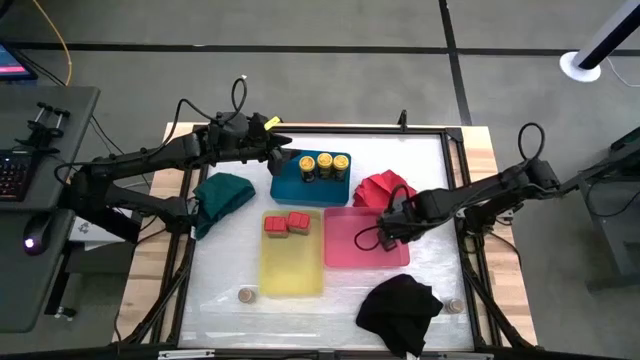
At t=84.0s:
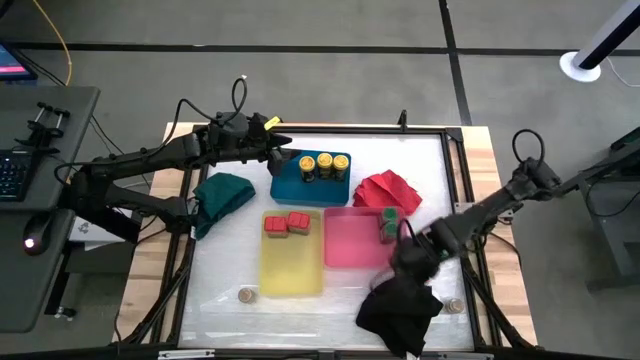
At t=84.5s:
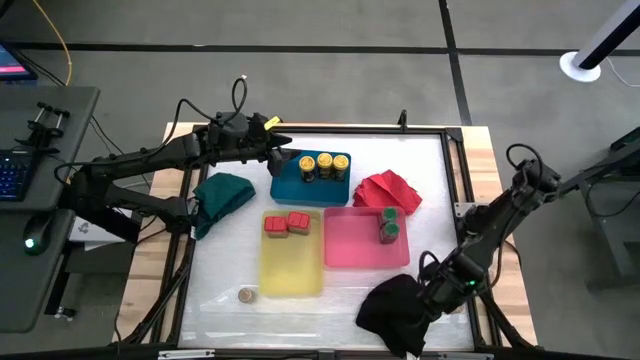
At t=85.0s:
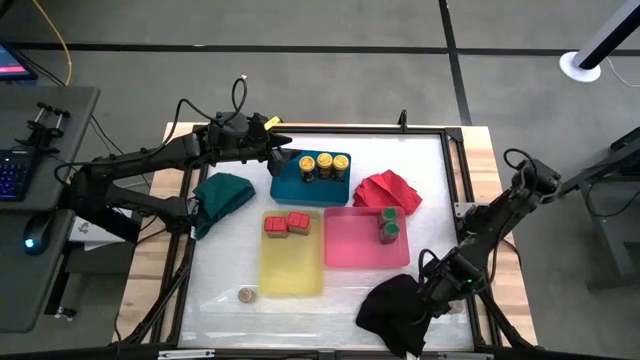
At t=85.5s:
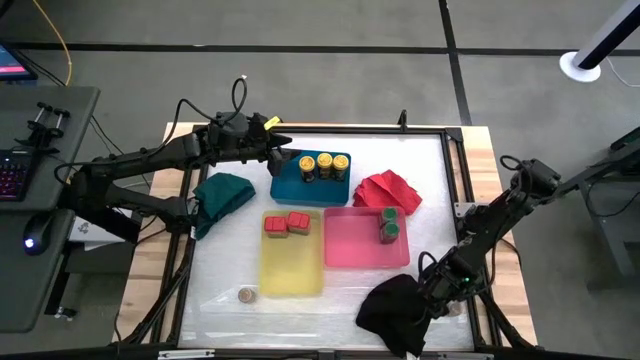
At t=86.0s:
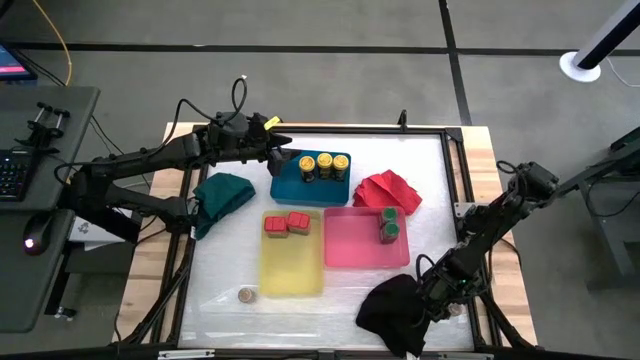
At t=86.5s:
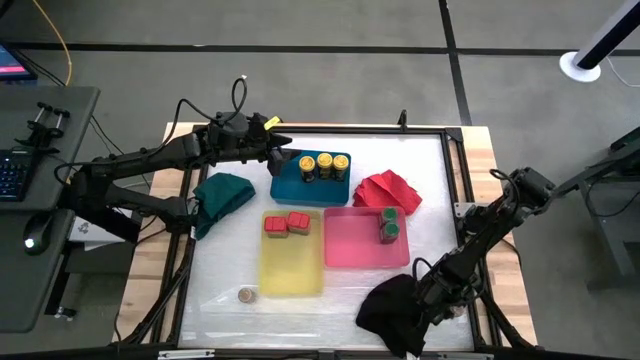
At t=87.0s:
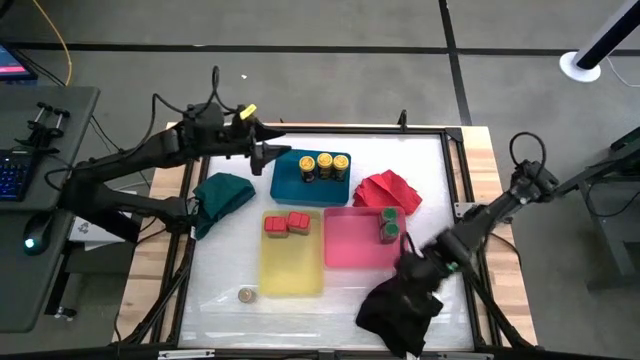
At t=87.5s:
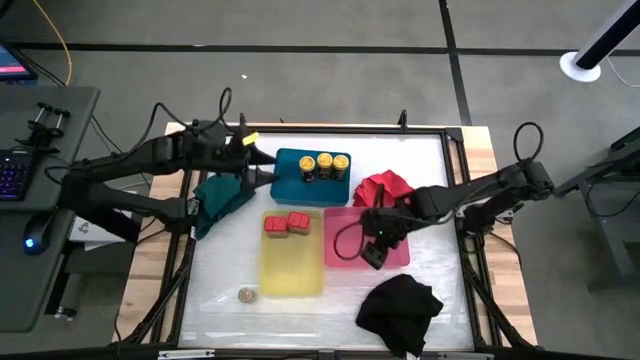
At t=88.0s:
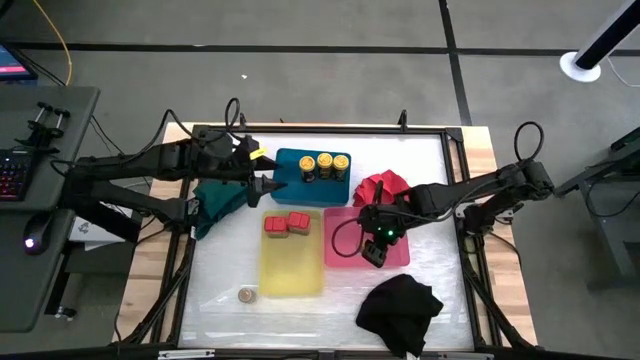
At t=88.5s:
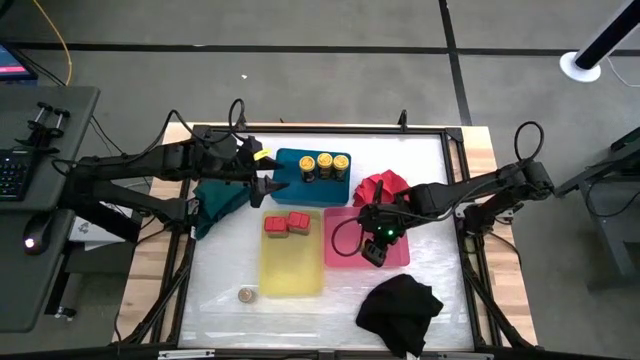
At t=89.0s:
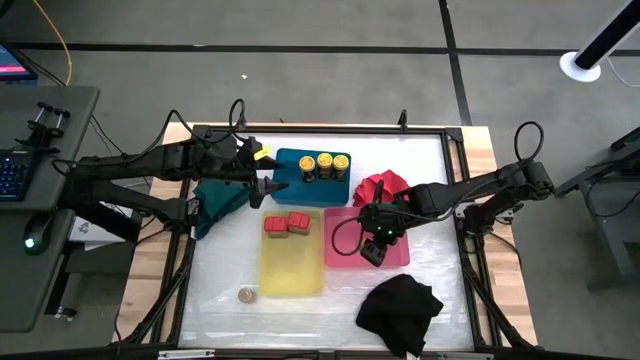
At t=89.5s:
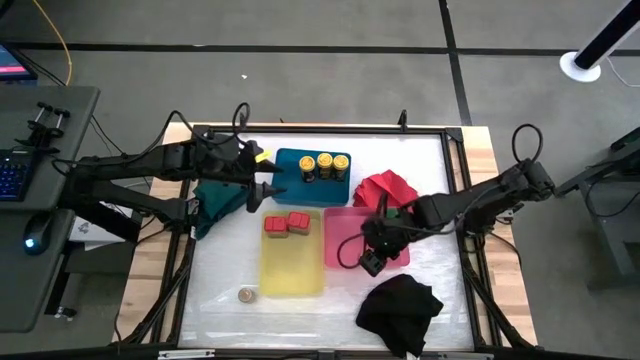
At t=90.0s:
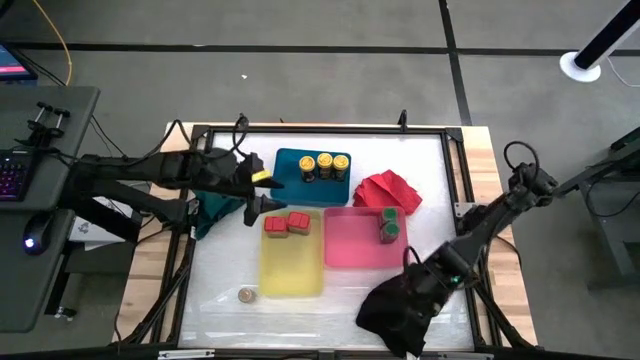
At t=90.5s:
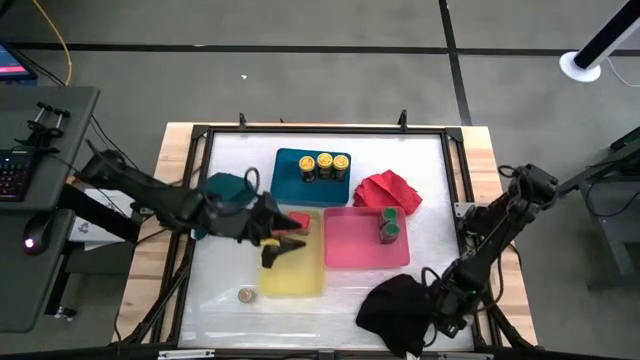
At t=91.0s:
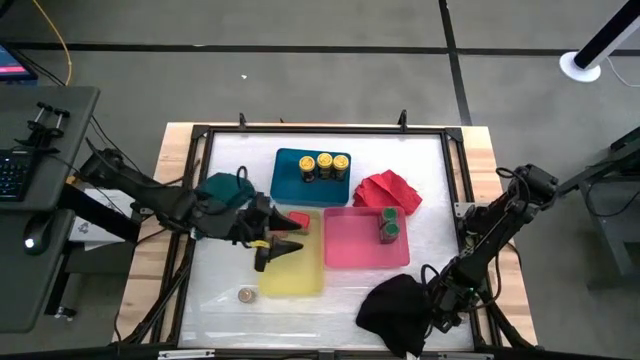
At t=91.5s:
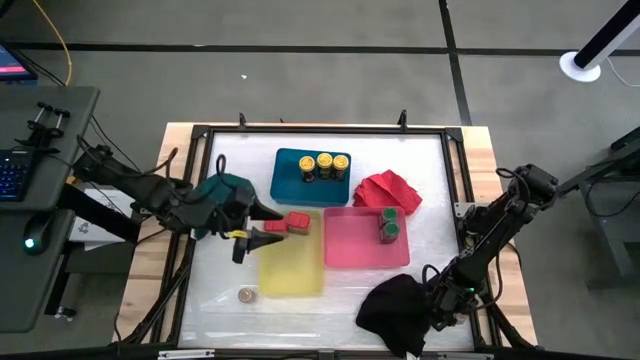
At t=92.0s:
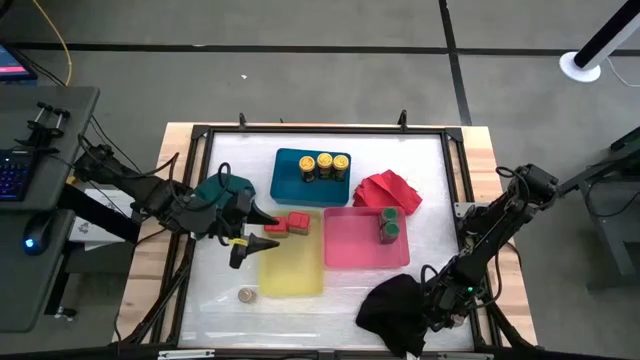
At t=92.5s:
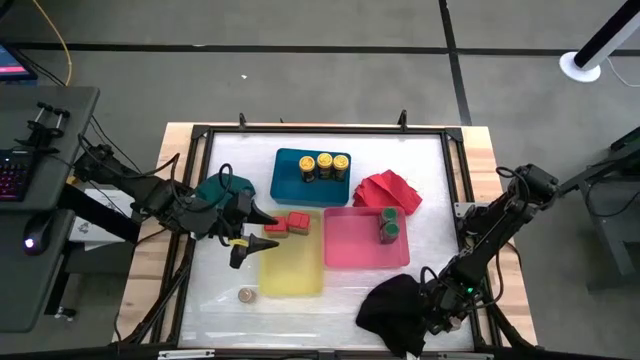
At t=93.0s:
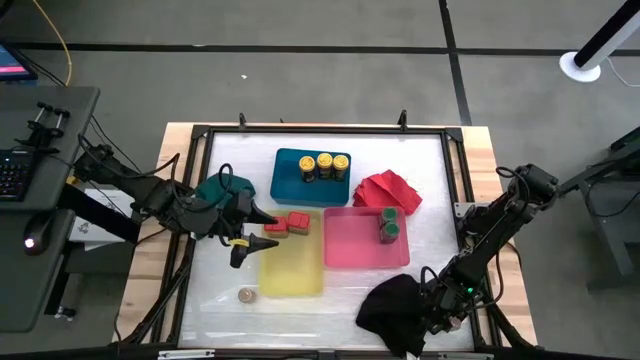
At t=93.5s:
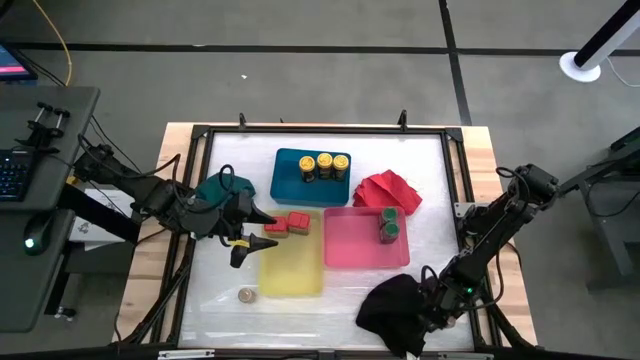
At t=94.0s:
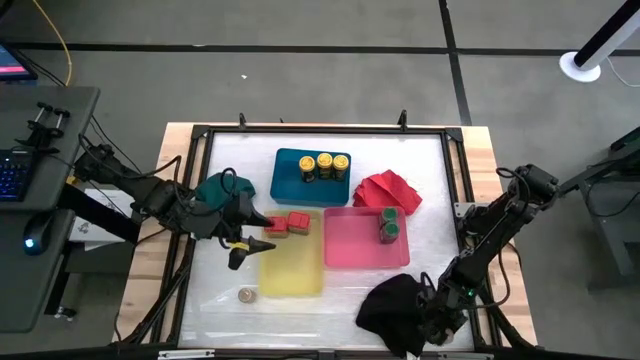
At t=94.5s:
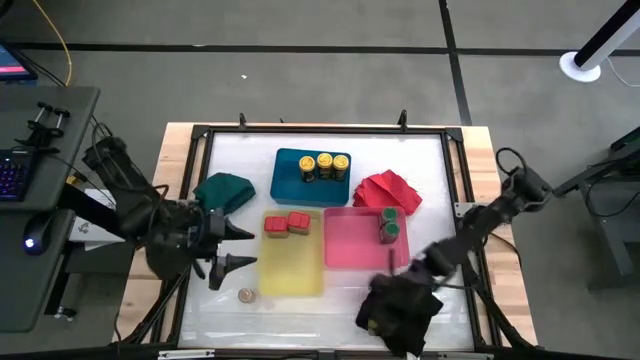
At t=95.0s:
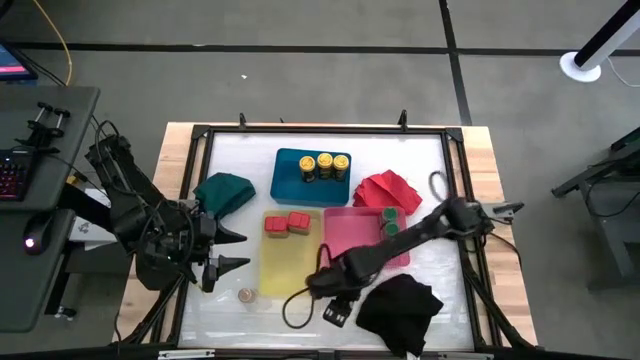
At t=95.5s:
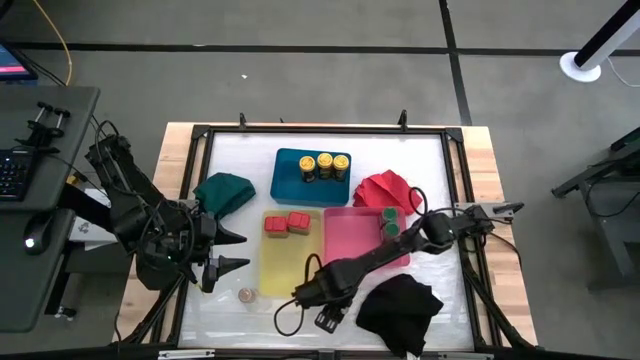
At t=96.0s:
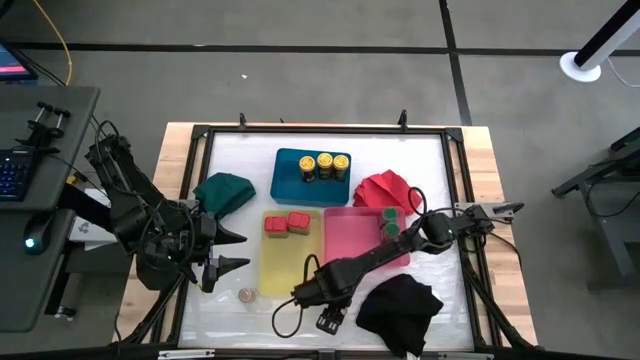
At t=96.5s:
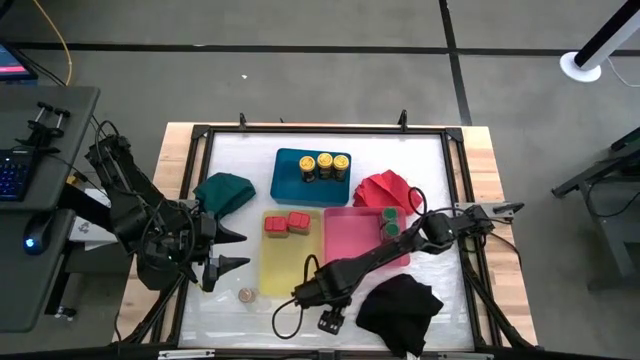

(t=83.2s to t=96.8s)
Task: Sort spices by type
Adjust the brown spice bottles on the table

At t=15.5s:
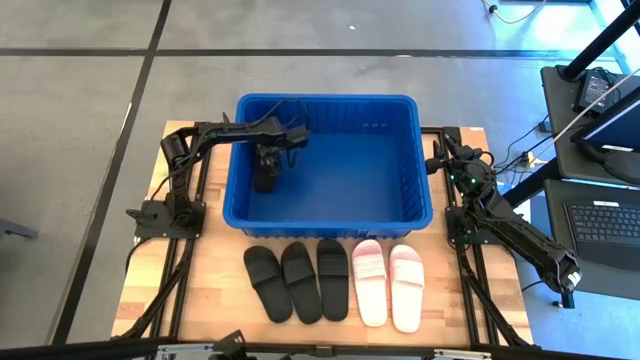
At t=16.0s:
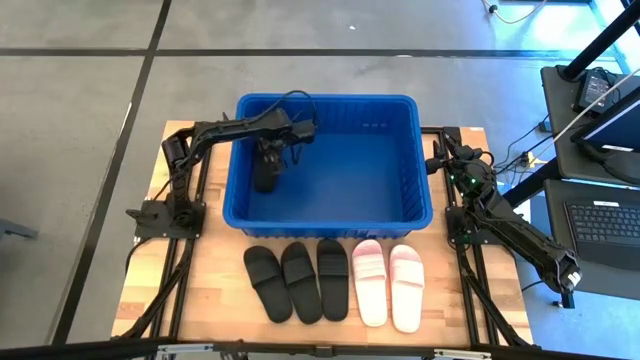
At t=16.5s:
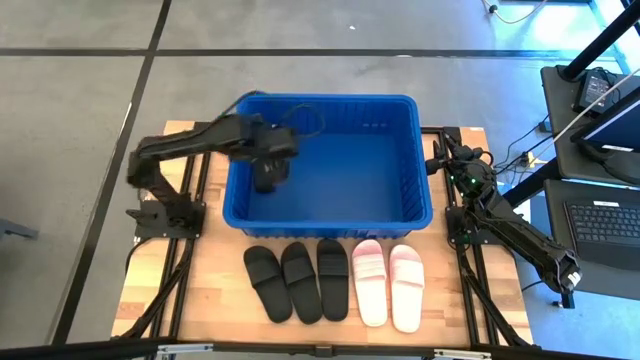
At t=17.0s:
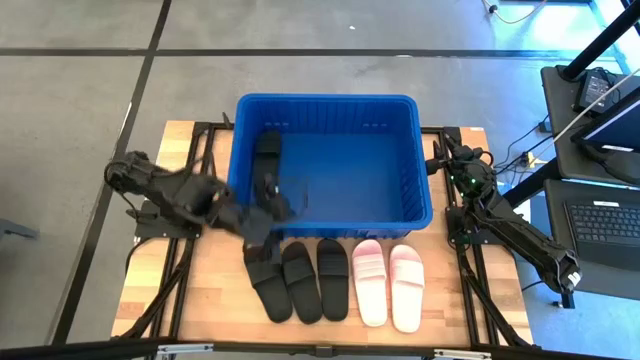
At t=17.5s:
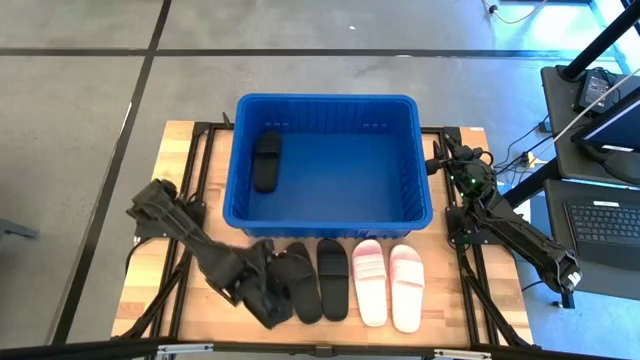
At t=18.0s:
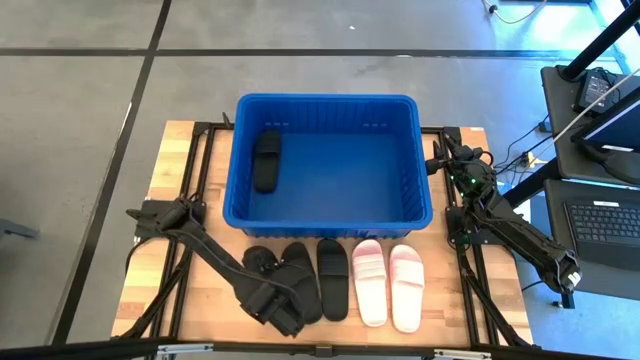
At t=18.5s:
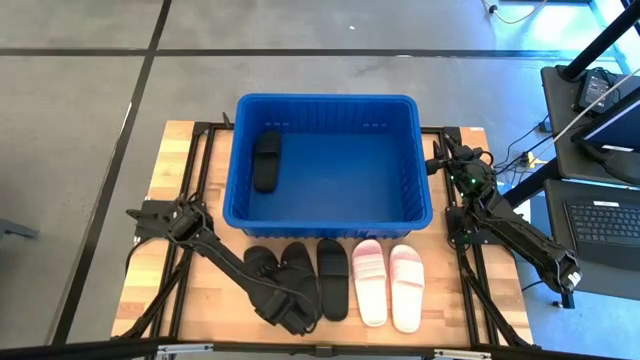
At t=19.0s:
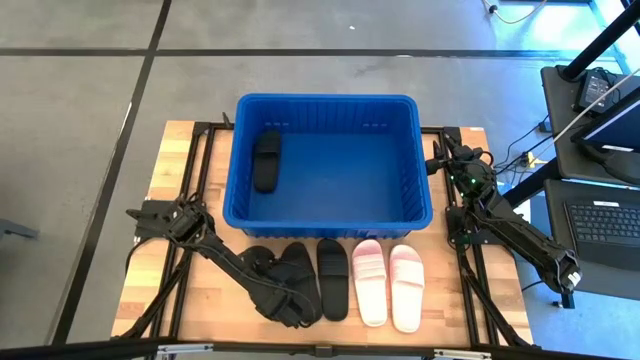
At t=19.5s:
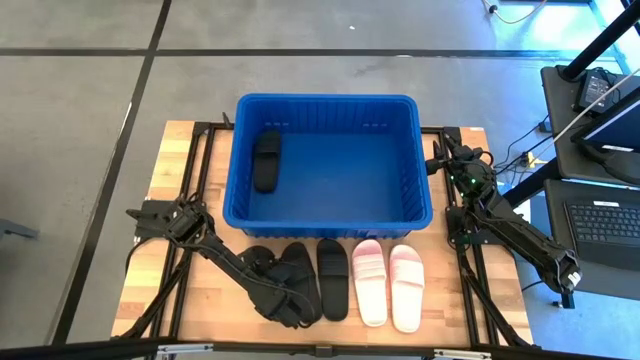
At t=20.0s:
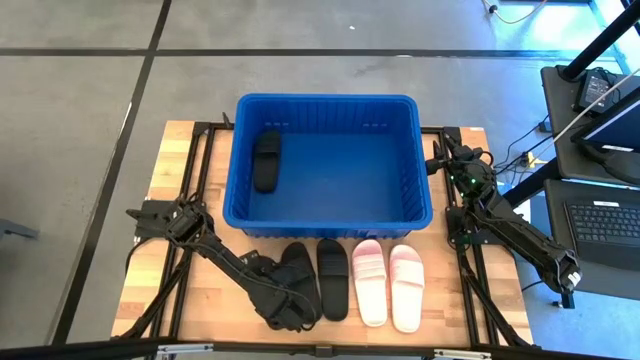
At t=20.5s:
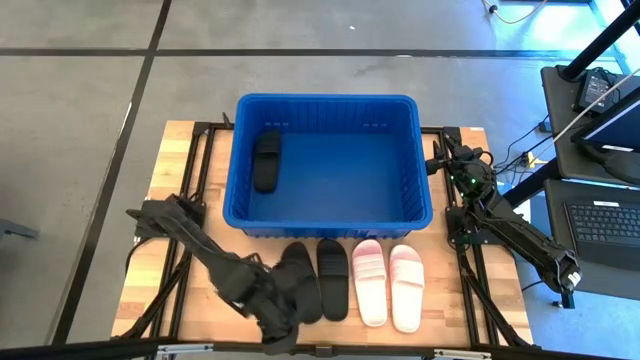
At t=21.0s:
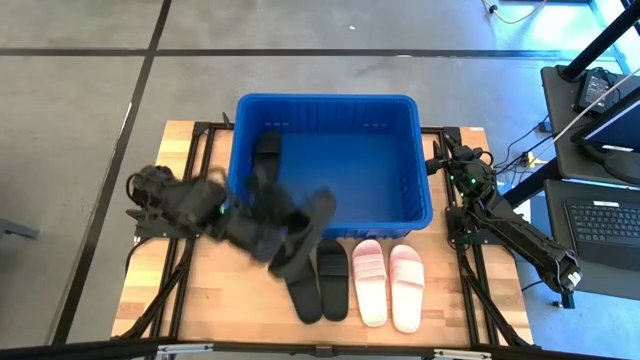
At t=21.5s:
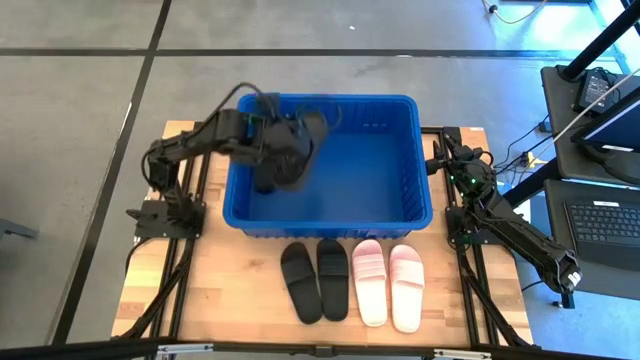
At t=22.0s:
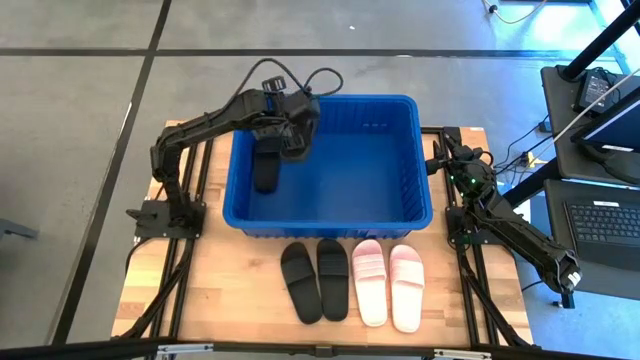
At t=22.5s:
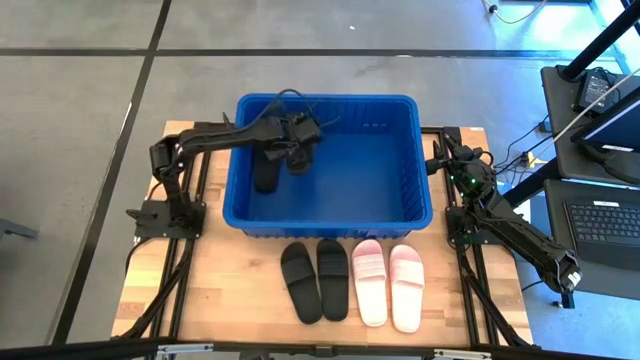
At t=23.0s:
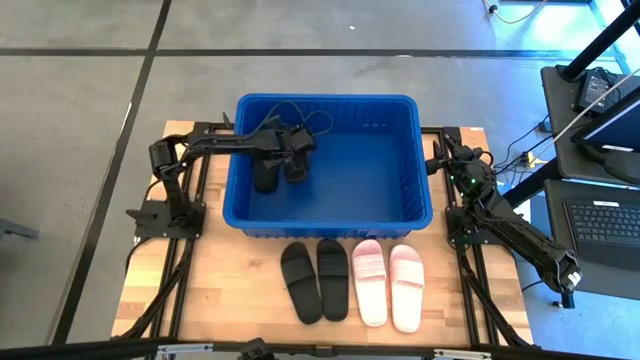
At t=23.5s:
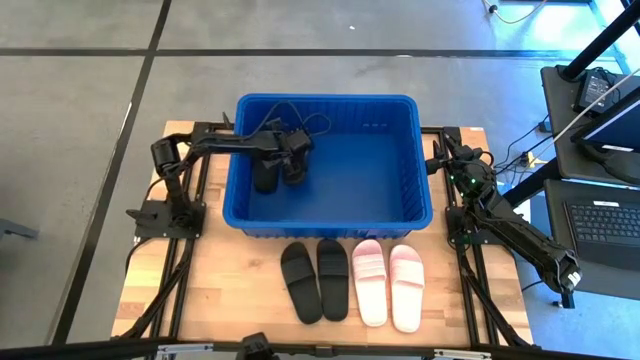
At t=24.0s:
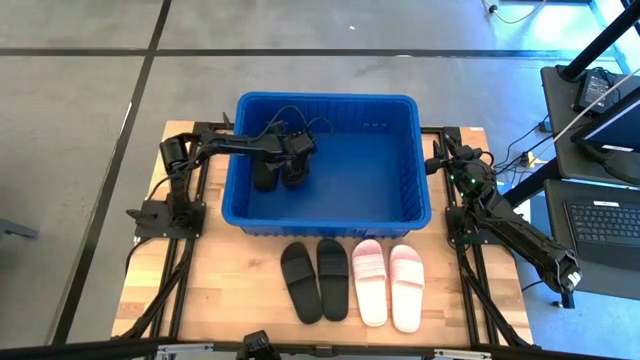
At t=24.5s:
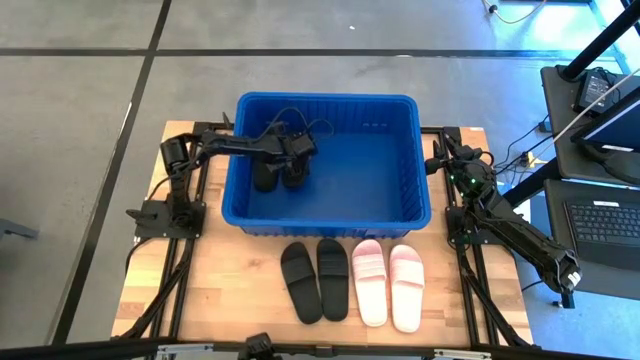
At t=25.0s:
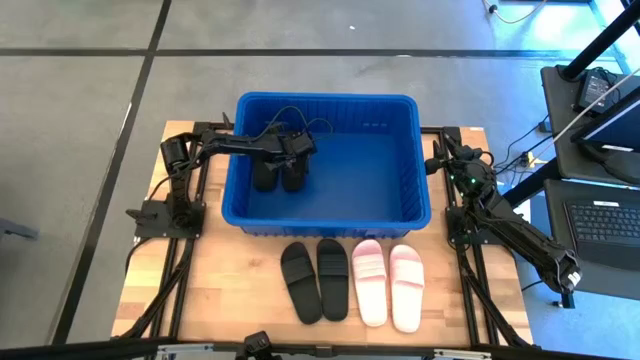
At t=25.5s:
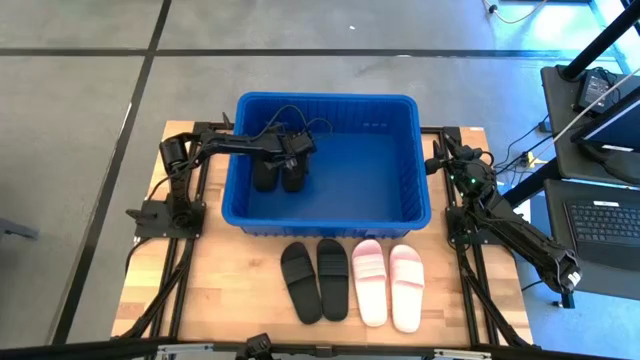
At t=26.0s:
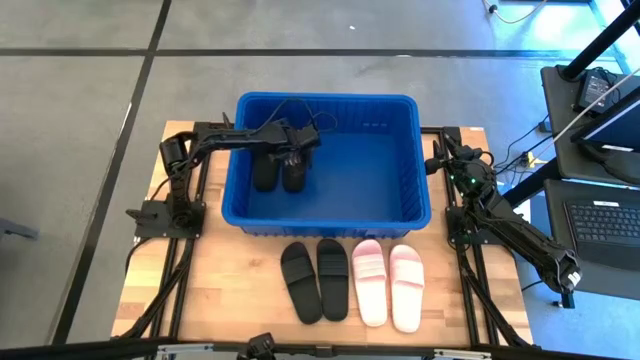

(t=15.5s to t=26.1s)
Task: Pick and place slides into bin
Put the black slide into the blue bin
